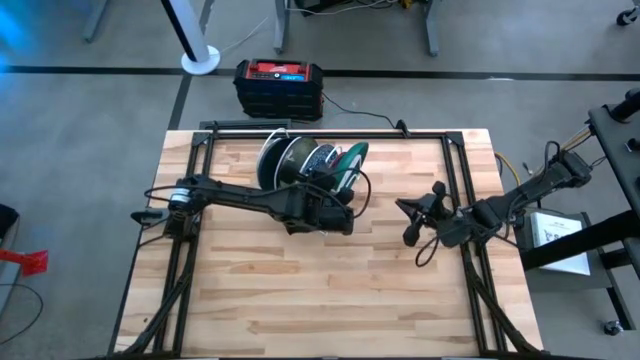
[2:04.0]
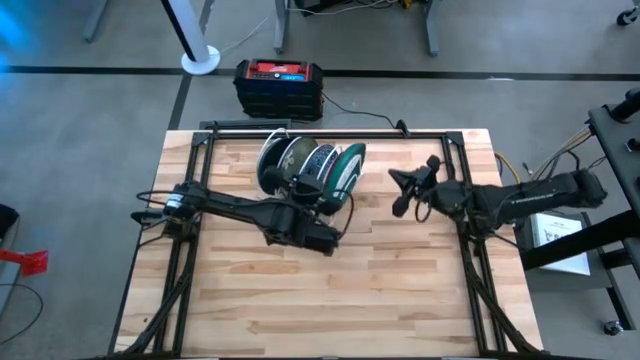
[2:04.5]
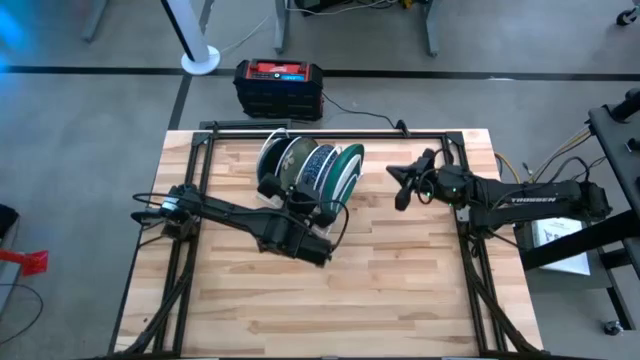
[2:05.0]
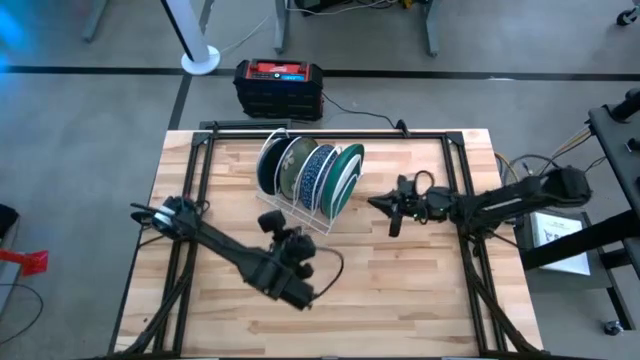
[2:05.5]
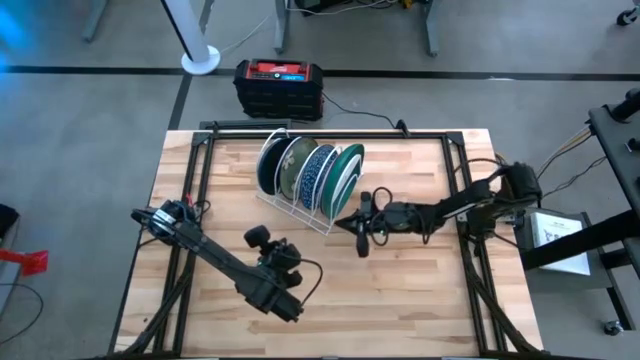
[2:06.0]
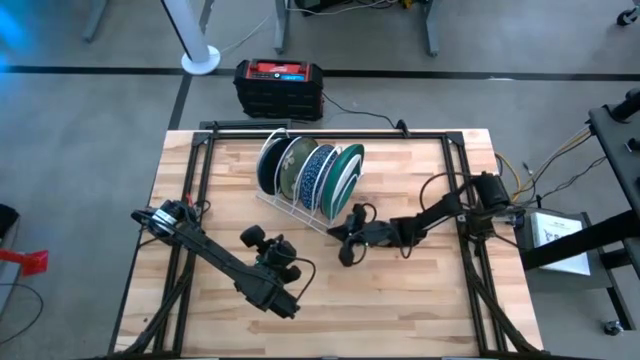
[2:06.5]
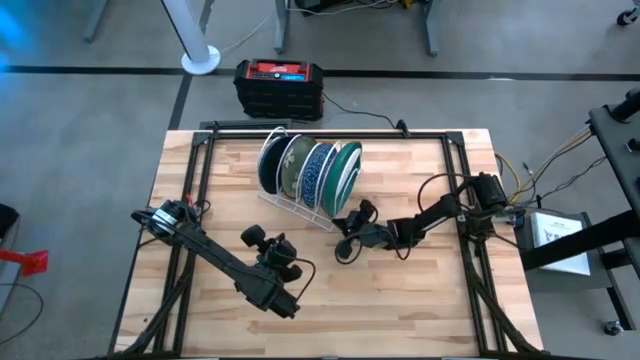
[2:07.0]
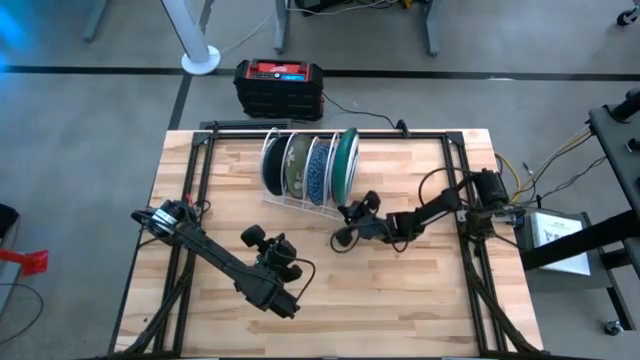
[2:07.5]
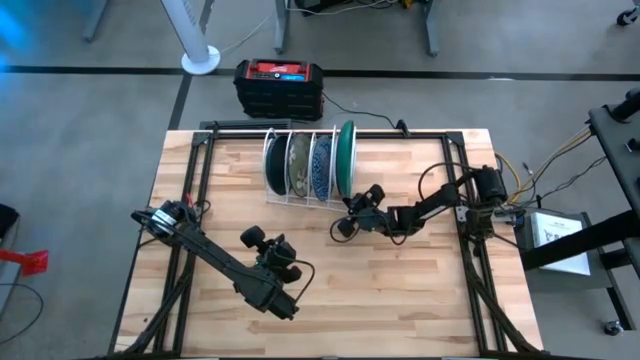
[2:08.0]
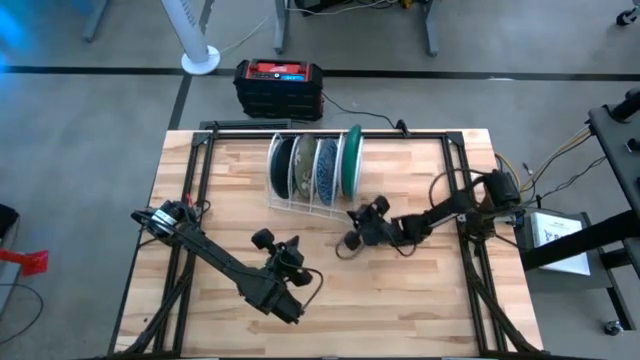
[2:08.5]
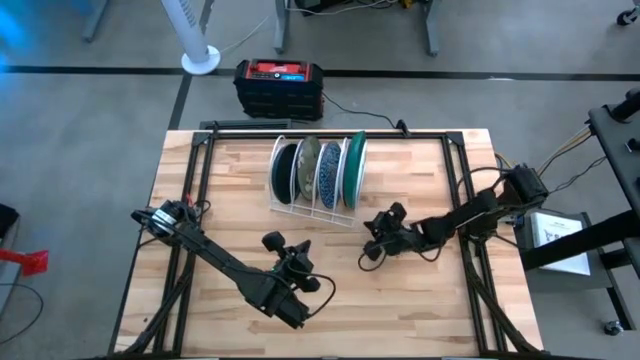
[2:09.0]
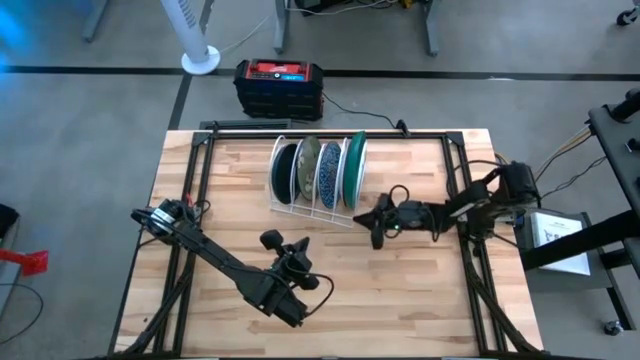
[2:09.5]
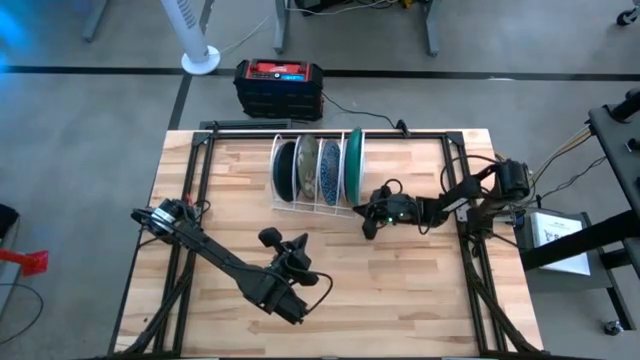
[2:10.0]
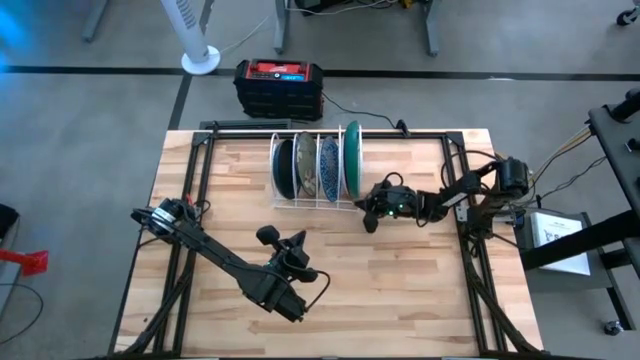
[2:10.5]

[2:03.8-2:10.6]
Task: Sort dishes
Adjust the white dish rack

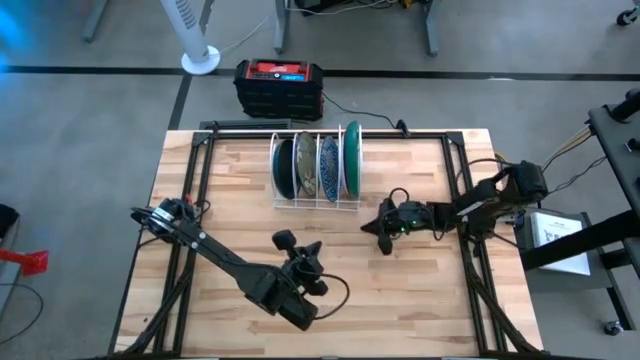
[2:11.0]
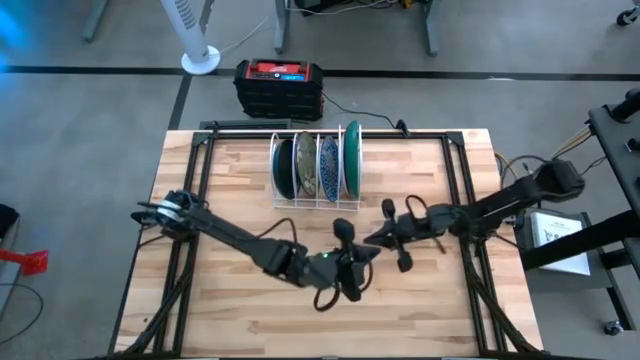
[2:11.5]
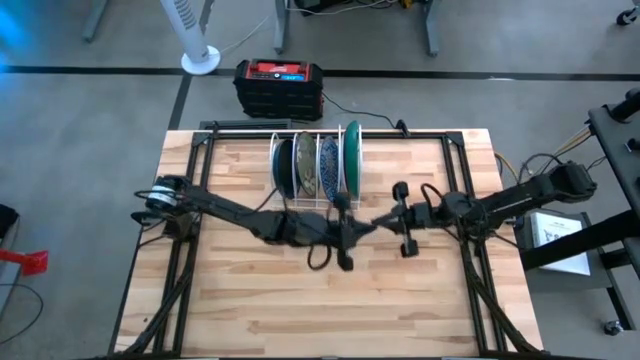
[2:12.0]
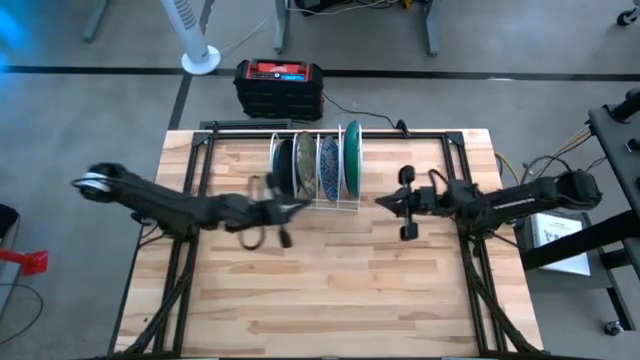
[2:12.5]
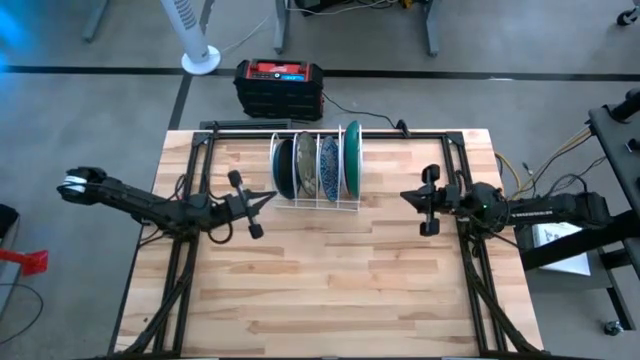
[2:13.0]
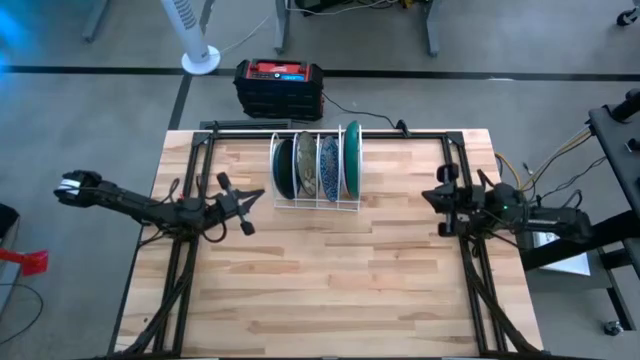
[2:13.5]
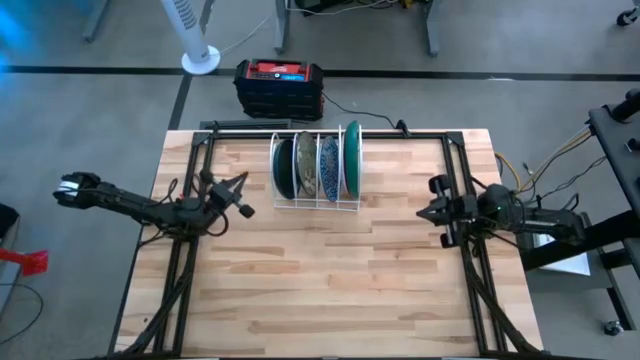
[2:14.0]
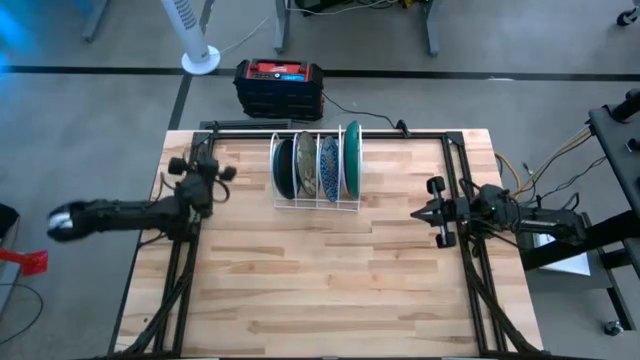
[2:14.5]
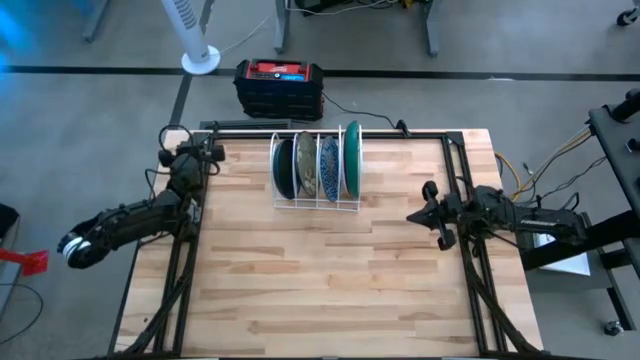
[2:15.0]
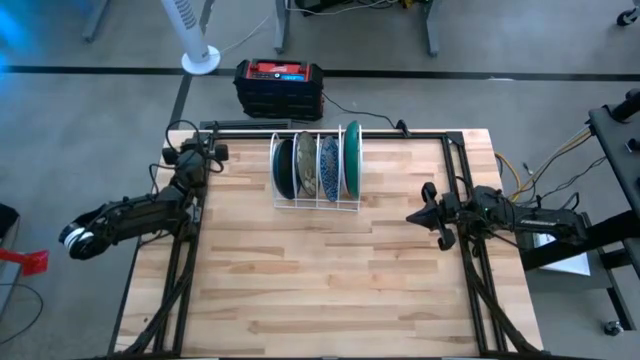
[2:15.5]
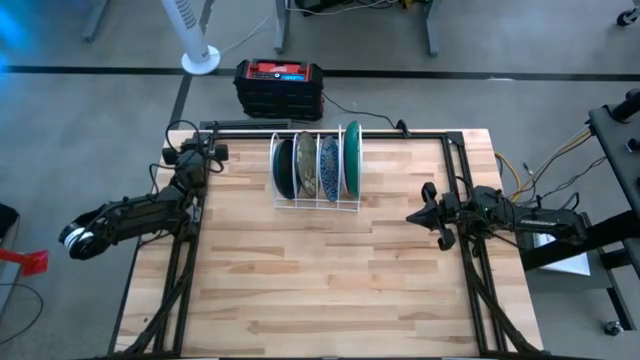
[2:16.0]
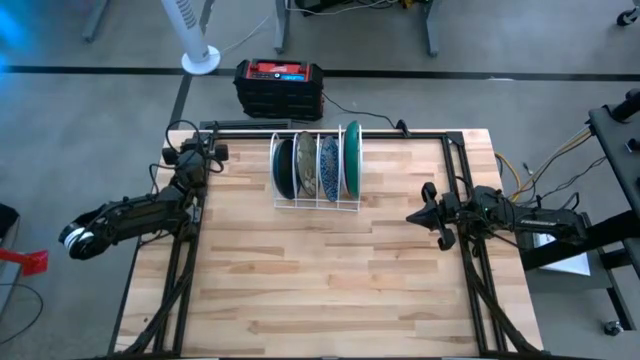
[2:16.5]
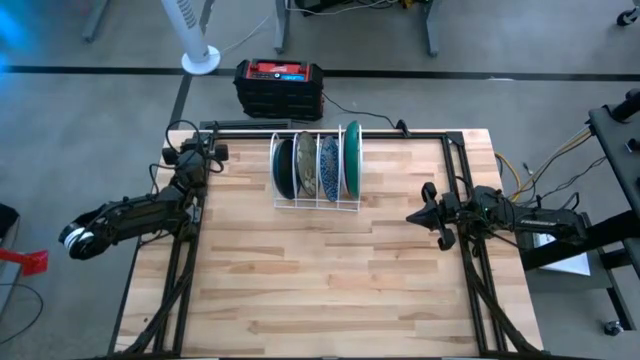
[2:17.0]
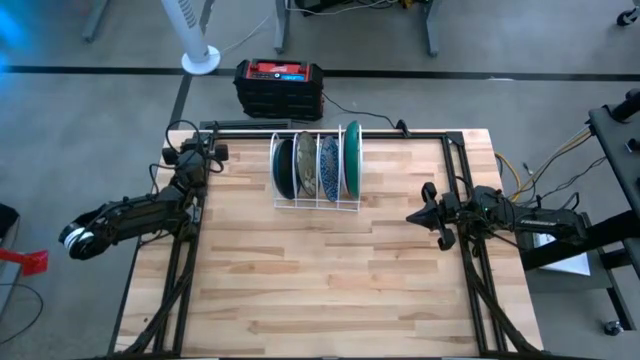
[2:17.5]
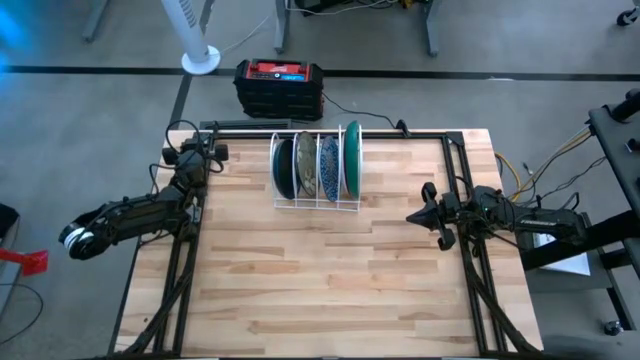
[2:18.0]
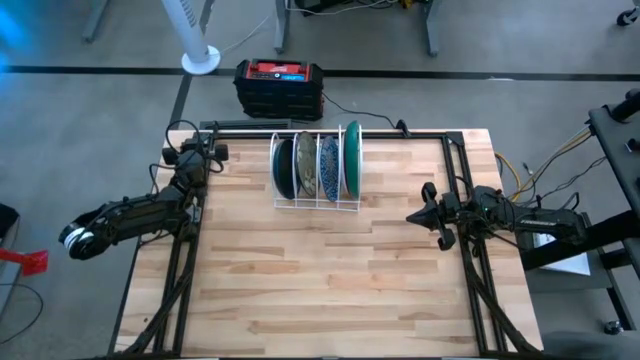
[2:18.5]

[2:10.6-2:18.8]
Return to Home Position

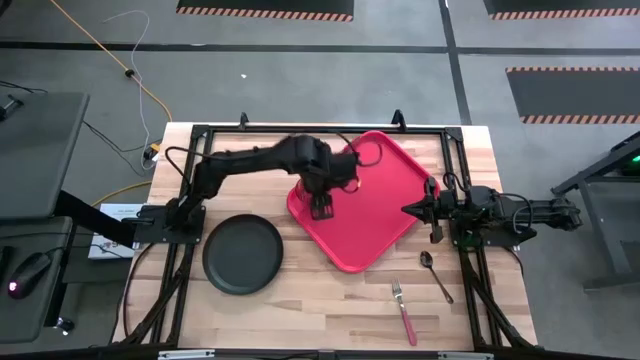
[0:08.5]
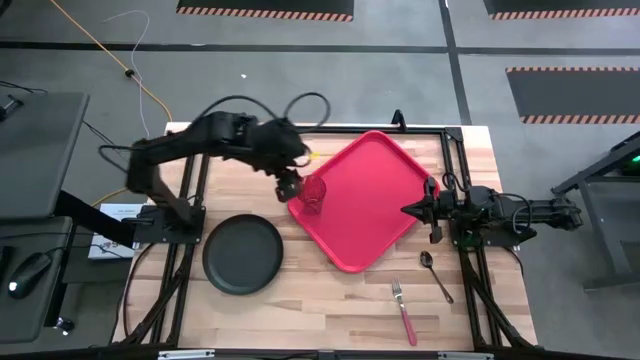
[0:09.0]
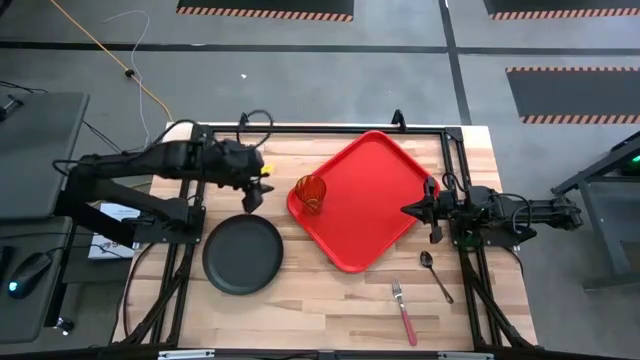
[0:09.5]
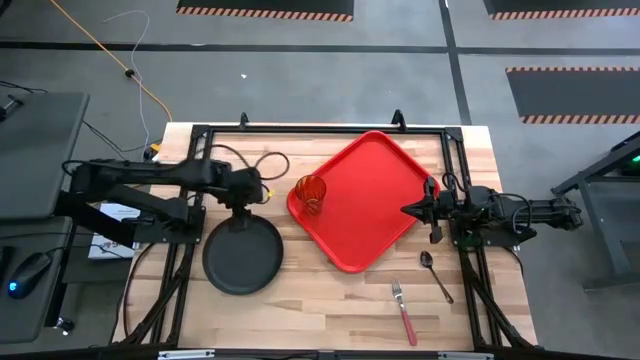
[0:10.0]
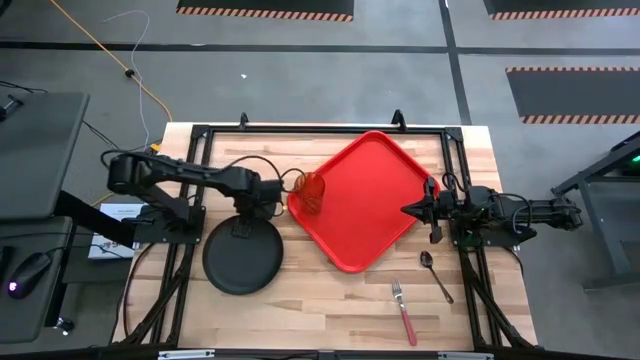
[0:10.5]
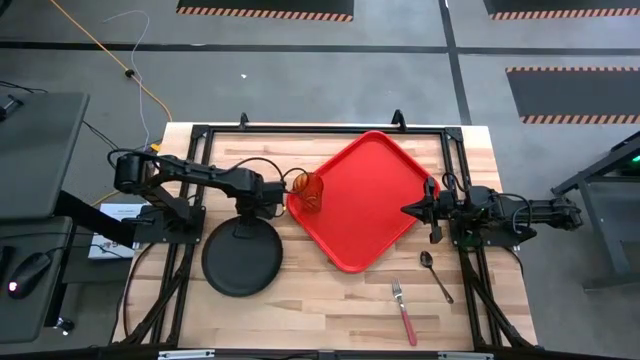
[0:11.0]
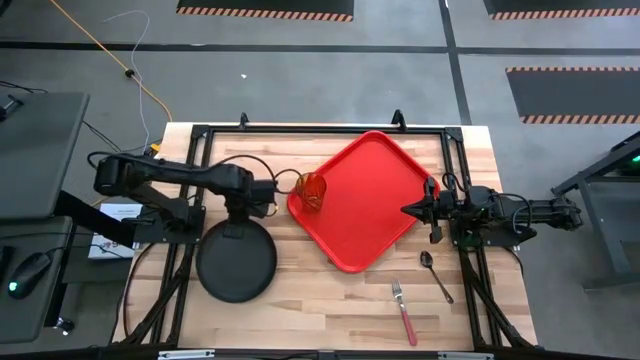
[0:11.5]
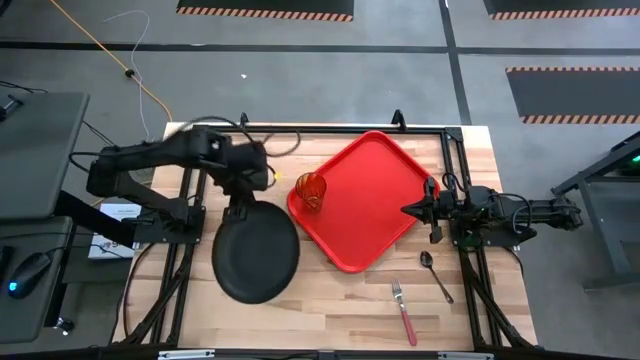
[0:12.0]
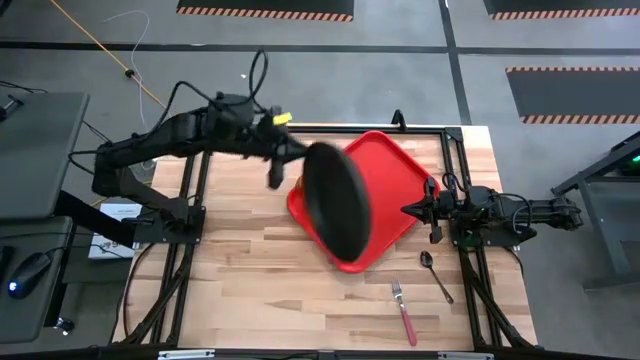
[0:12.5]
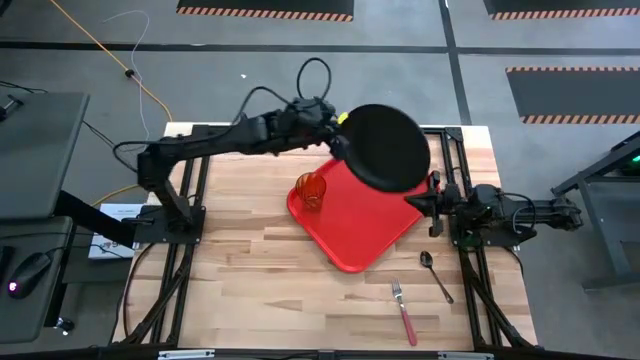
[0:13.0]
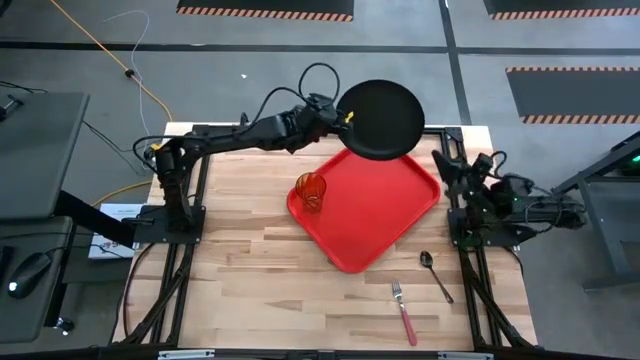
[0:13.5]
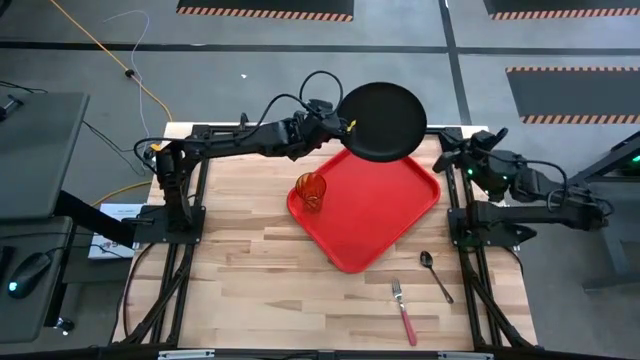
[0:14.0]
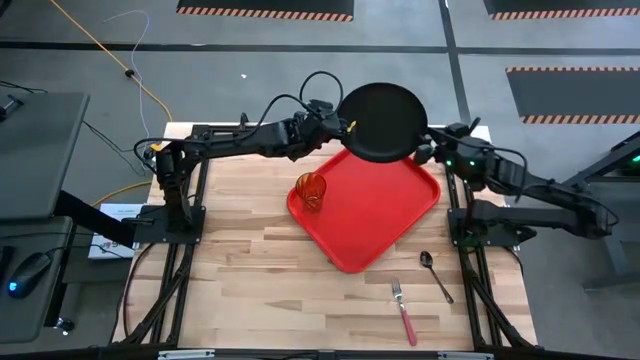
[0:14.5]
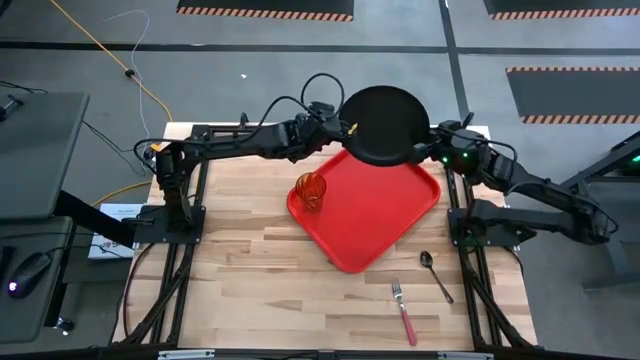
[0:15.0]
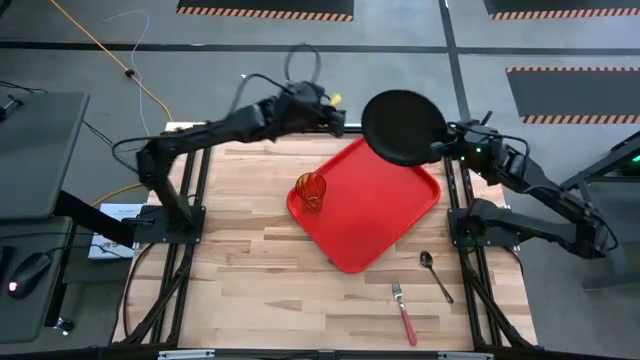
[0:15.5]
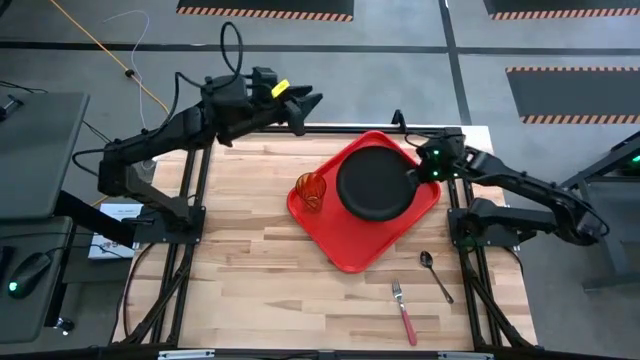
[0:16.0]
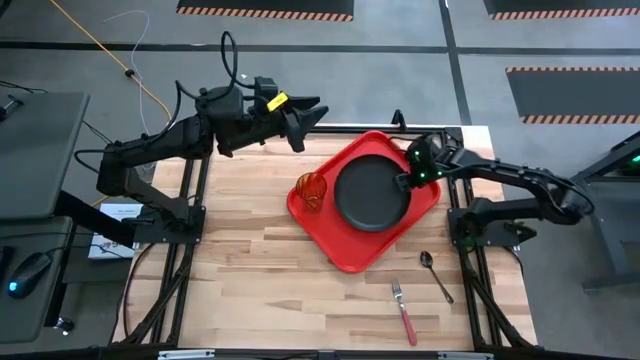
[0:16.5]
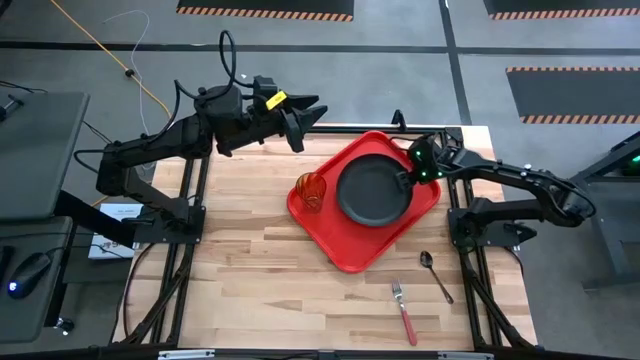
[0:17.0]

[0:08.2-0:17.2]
Task: Pick and place plate/cup/fork/spoon on tray
Put the black plate on the orange serving tray to the bottom right of the brown cup
